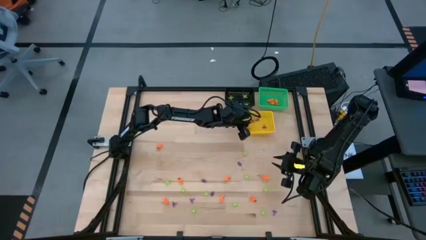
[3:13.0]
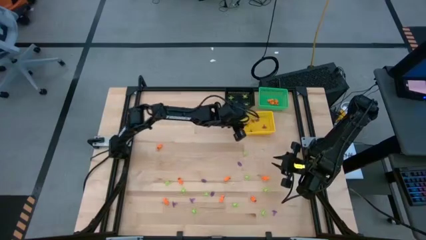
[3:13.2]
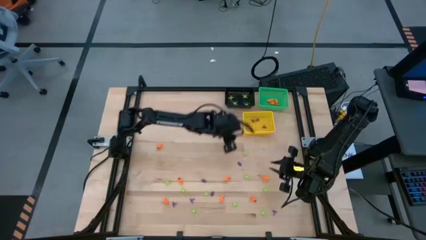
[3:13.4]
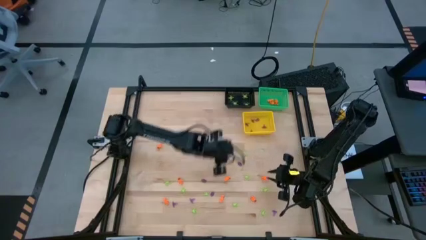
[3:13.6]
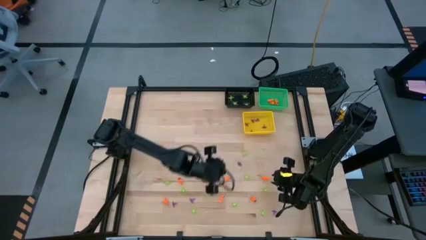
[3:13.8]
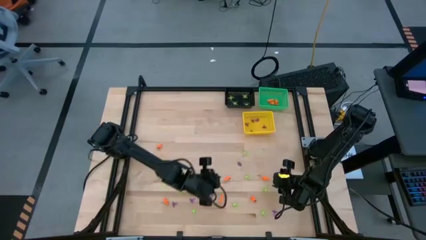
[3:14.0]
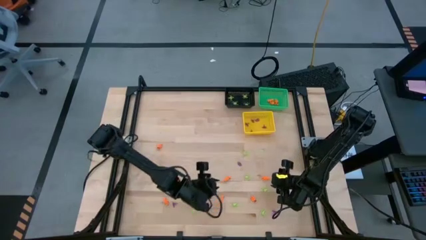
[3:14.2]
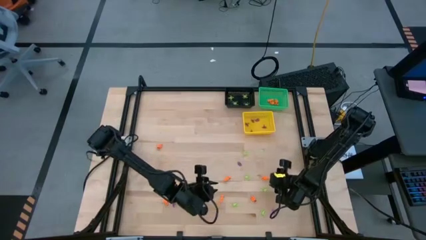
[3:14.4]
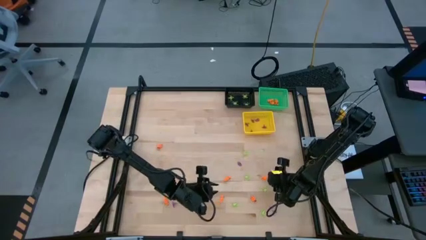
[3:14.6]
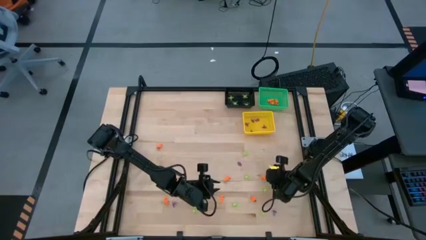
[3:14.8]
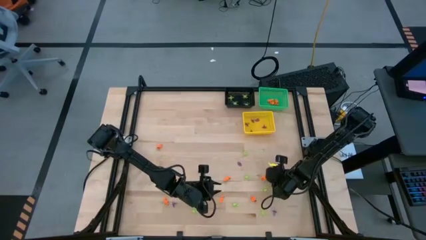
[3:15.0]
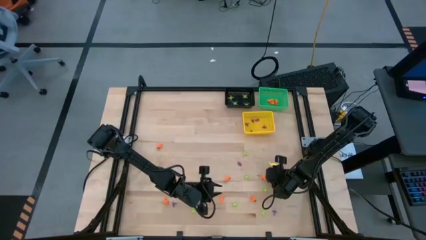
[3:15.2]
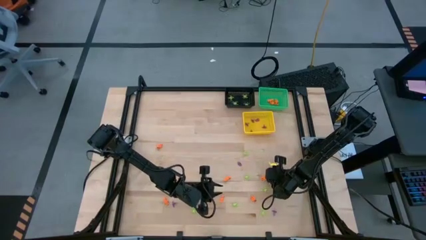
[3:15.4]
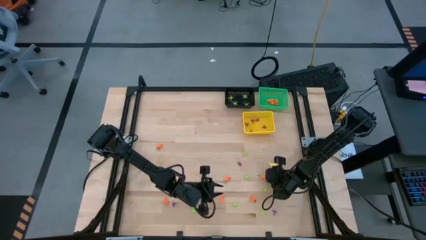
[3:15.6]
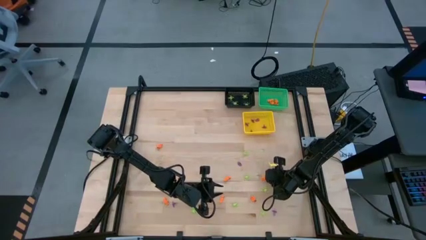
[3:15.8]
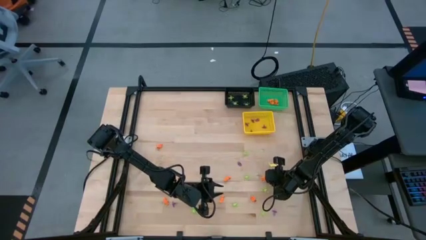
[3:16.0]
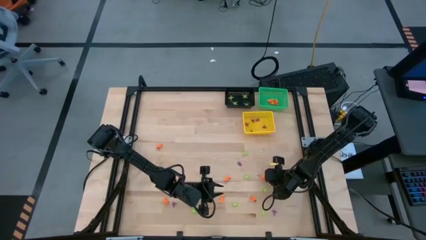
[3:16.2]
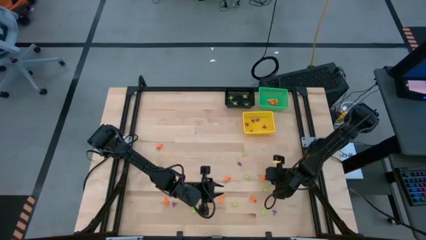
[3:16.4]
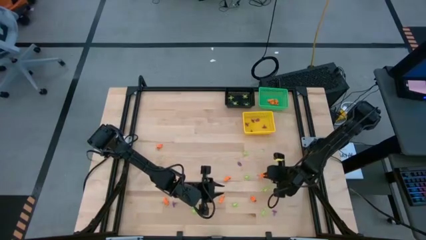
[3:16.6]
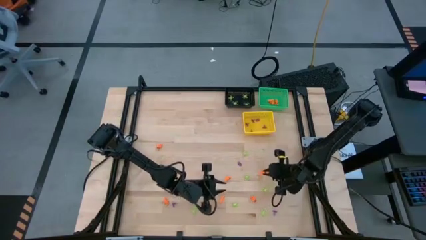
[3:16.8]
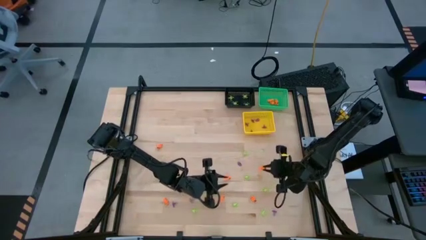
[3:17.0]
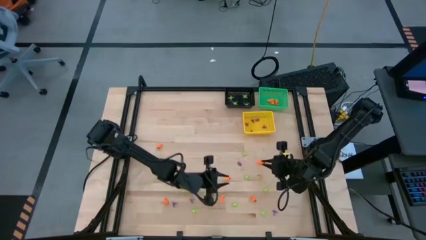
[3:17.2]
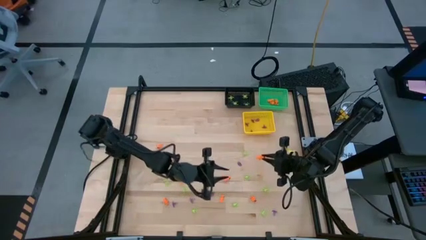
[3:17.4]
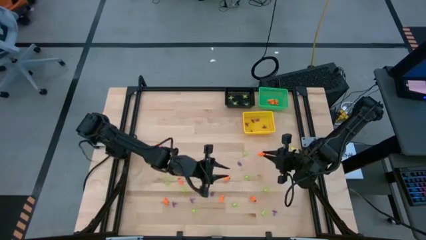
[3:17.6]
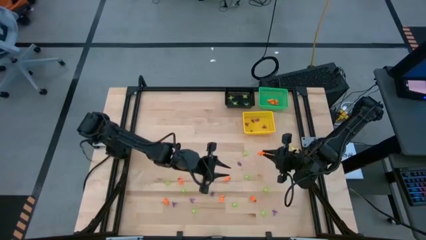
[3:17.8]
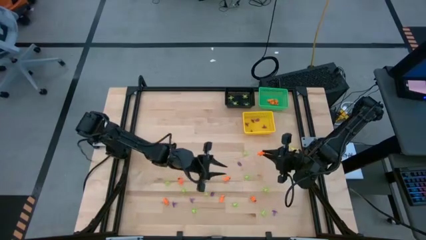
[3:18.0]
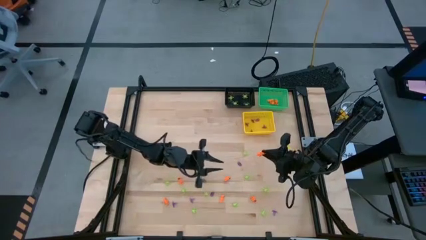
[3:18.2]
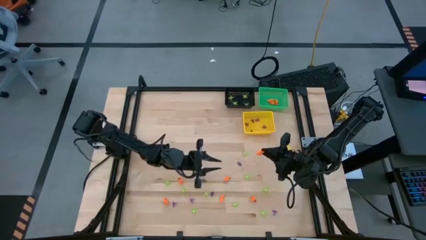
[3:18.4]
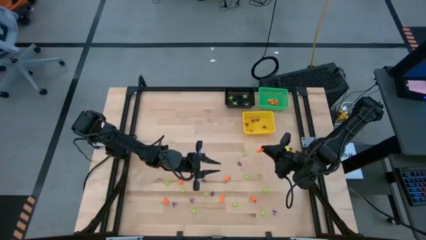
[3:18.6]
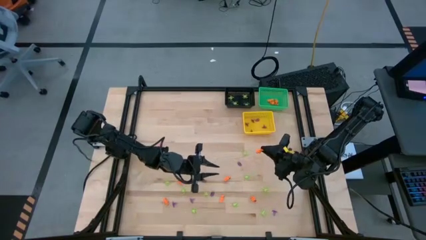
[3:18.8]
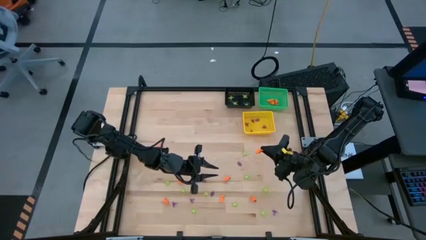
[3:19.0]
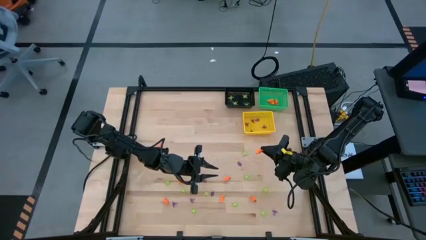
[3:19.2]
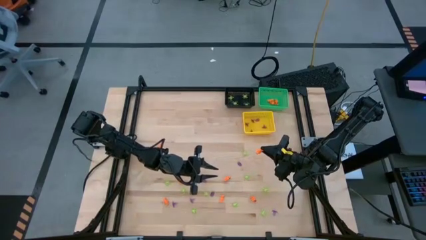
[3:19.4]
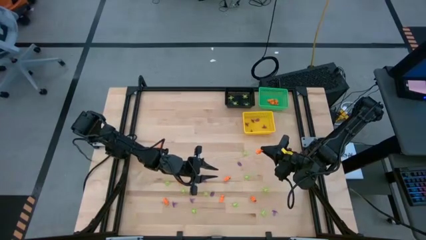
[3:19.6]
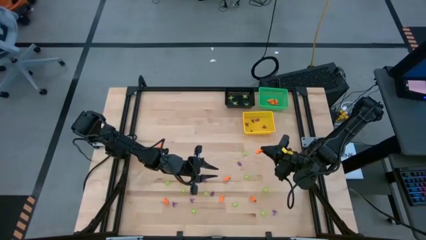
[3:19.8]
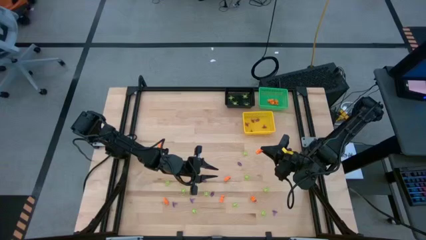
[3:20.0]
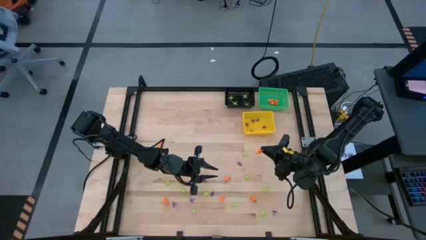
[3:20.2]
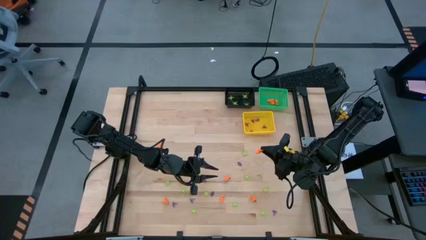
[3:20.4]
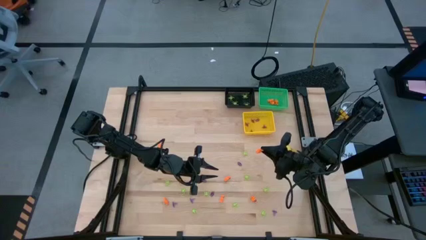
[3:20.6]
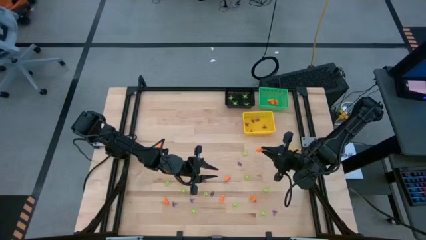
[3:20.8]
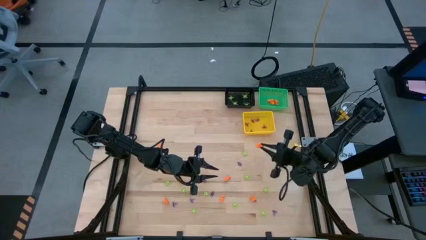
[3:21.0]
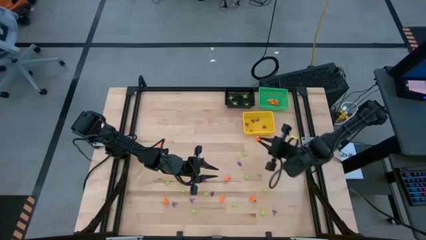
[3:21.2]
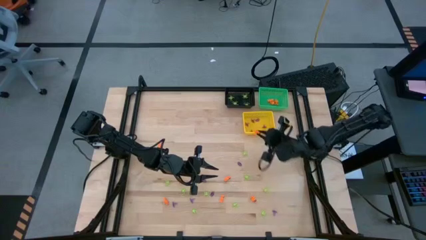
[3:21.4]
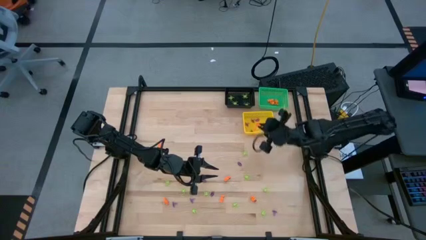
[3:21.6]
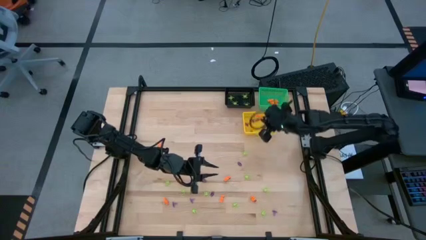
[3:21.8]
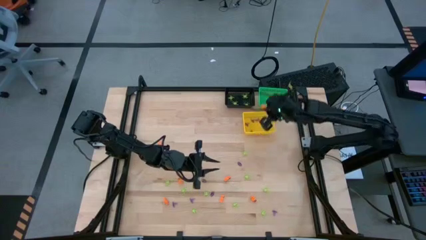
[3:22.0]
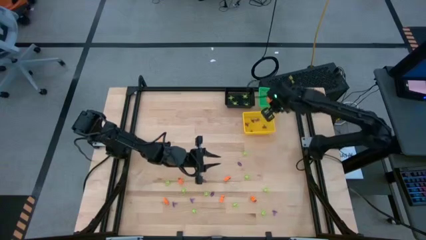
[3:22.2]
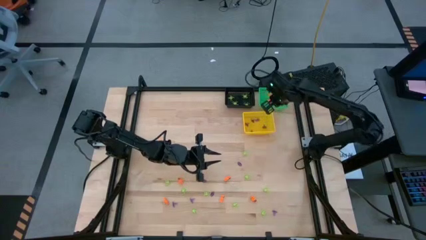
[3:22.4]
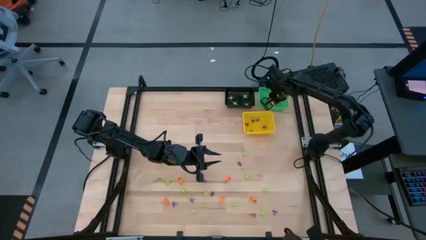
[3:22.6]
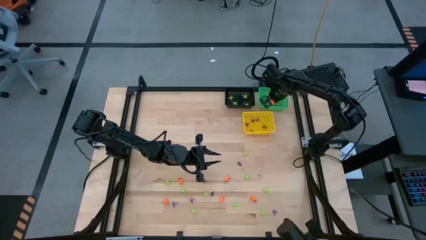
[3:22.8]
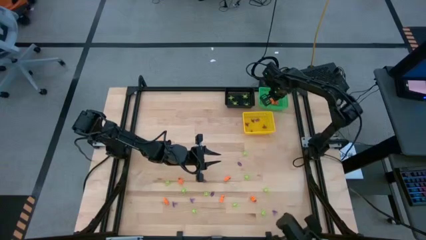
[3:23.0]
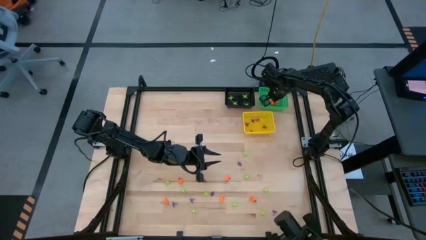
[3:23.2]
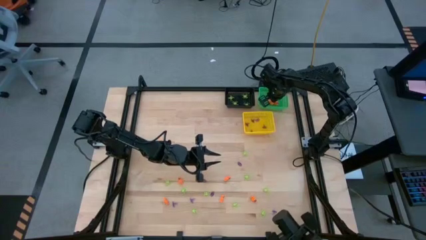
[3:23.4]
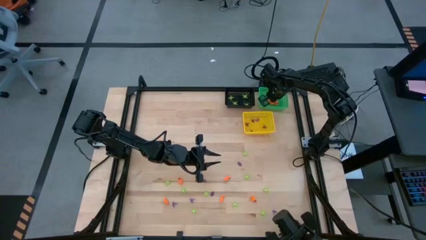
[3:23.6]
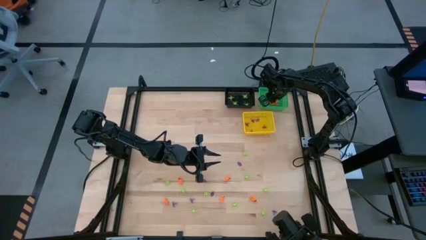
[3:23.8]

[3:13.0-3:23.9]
Task: Sort Halloween decoration
Put the orange skeleton toy into the green basket

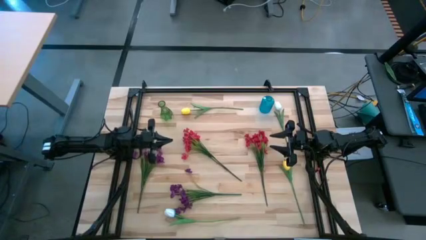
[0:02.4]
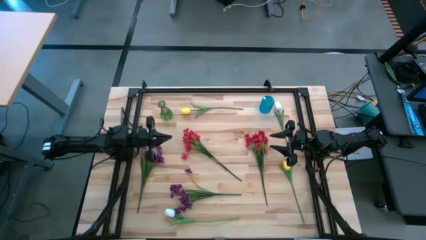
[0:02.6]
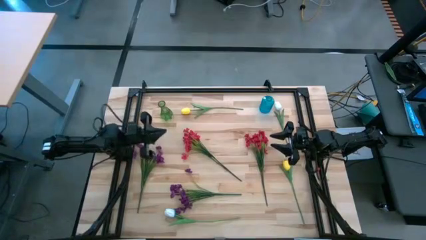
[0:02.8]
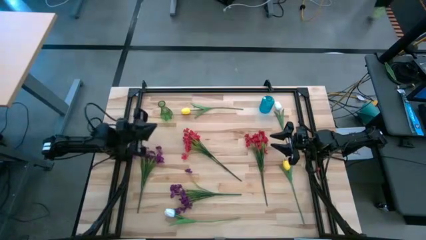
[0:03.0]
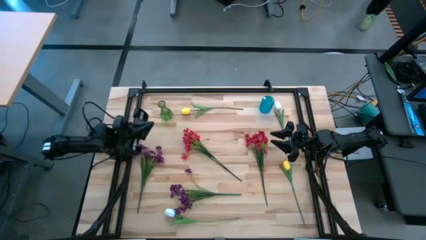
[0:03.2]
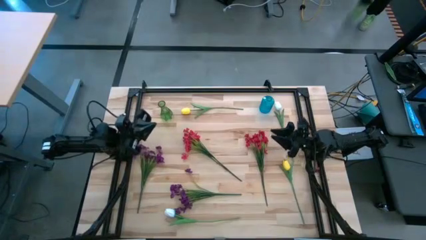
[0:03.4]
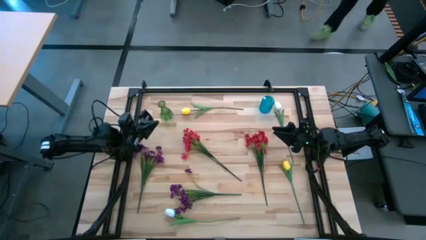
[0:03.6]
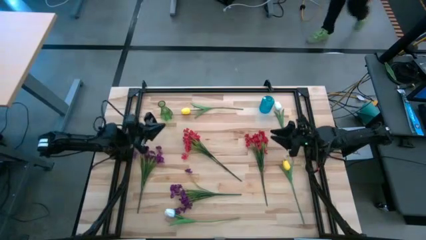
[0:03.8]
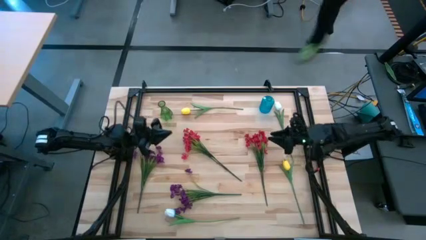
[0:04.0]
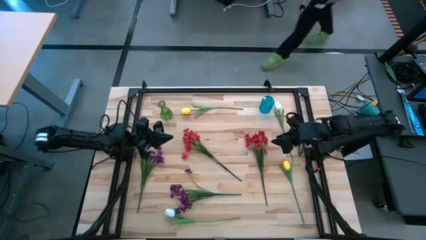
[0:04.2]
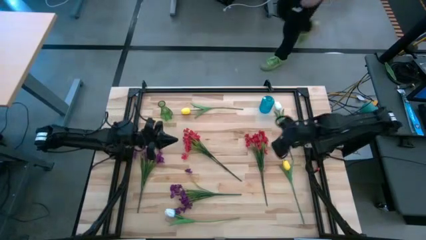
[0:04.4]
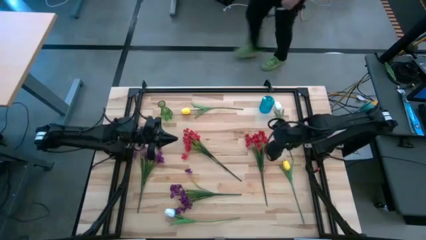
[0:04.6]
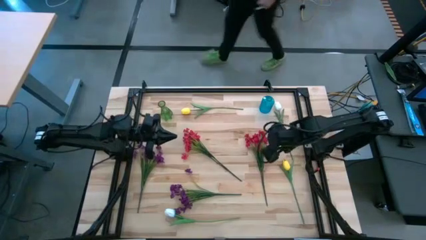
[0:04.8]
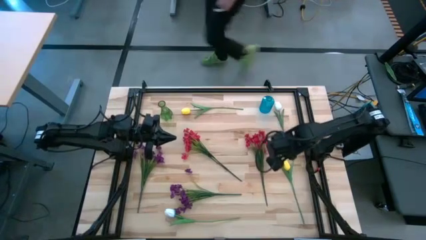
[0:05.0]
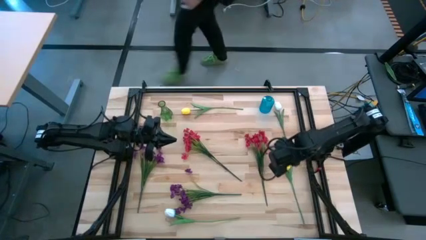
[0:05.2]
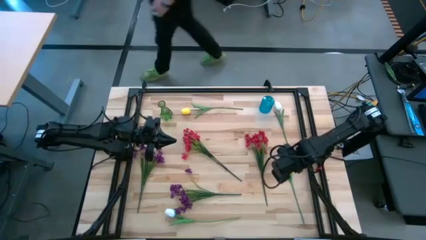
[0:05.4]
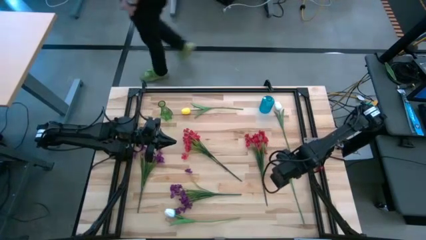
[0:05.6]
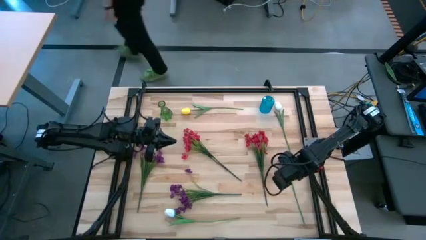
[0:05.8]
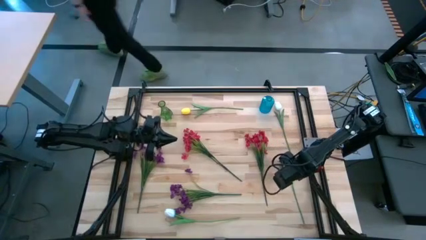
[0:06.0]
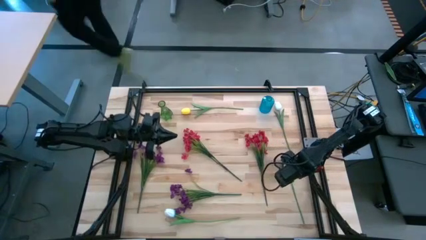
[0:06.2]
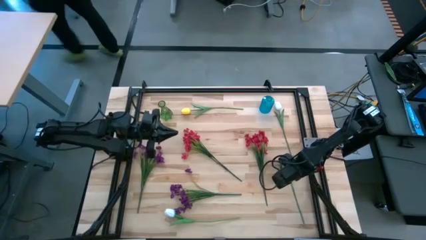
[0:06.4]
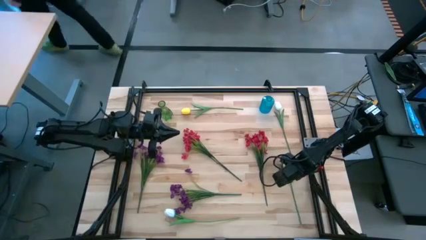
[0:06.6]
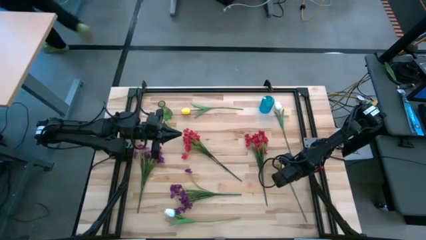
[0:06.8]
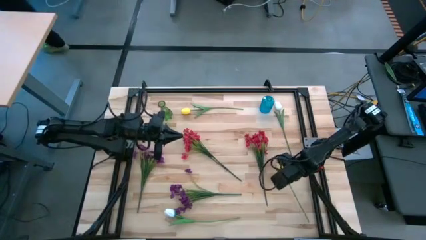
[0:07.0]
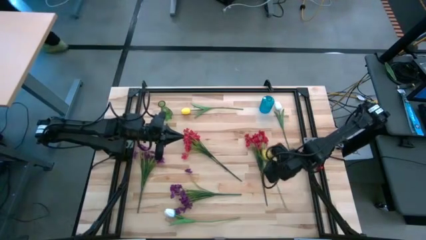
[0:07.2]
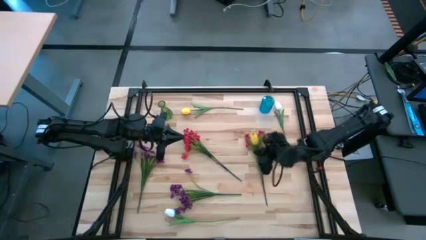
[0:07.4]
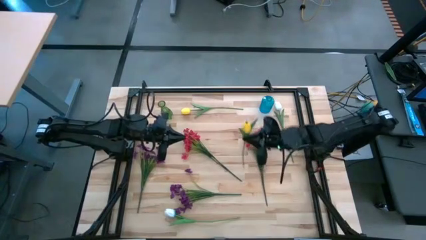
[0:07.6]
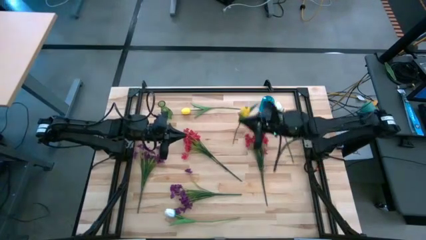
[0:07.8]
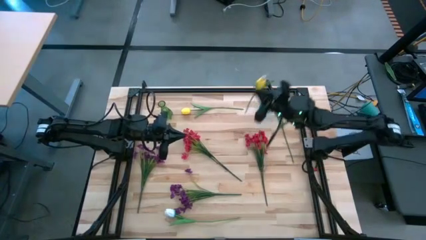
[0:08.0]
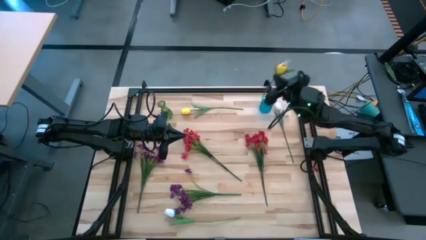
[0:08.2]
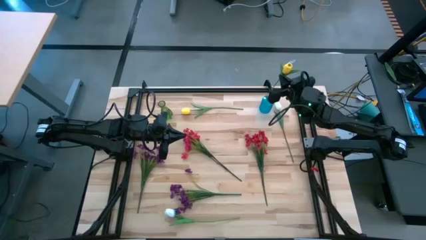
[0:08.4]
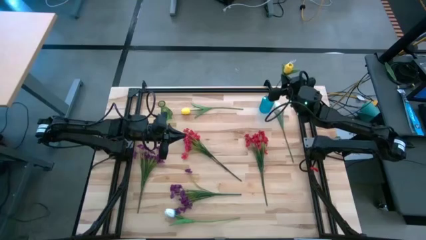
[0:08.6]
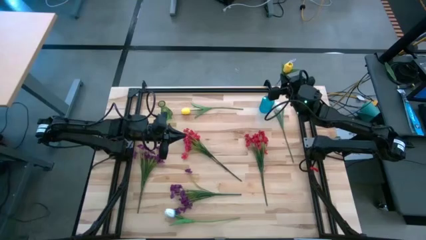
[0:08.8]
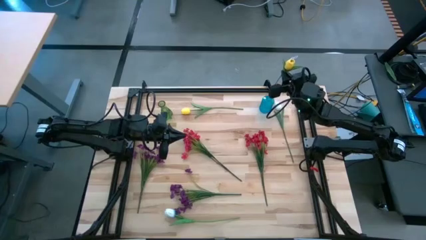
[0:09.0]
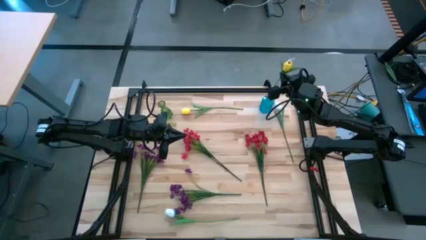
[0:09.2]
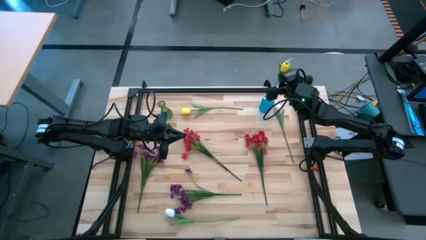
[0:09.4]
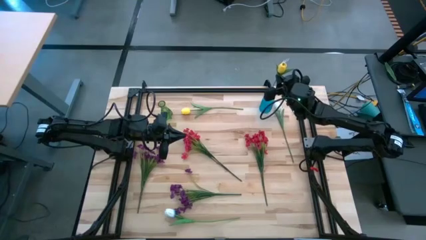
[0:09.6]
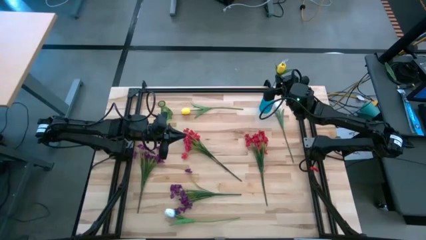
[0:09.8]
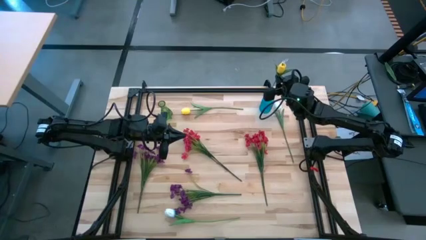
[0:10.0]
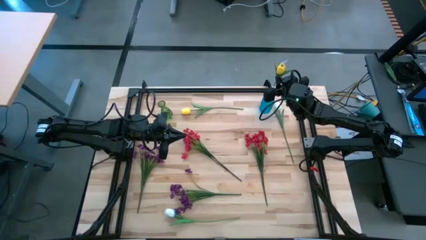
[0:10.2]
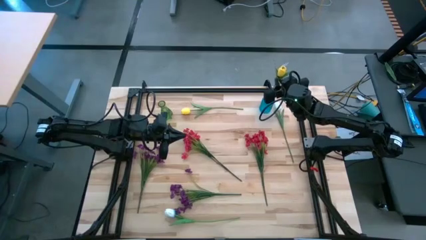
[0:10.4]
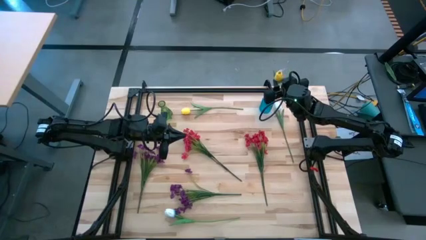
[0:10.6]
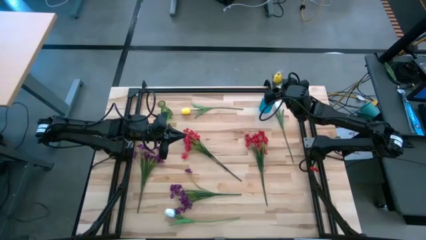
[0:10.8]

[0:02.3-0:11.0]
Task: Sort flowers into vase by color
Put the bottom yellow tulip into the blue vase
